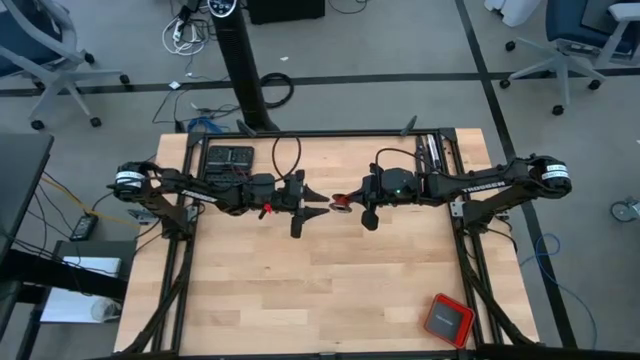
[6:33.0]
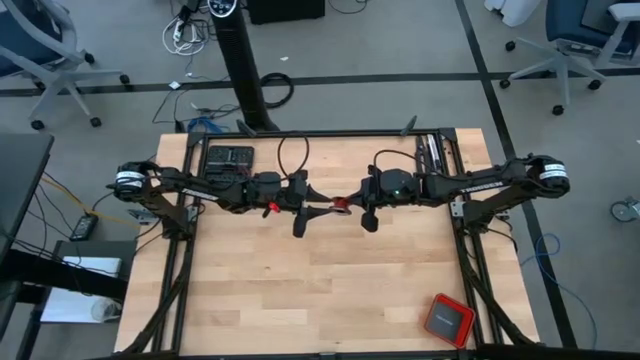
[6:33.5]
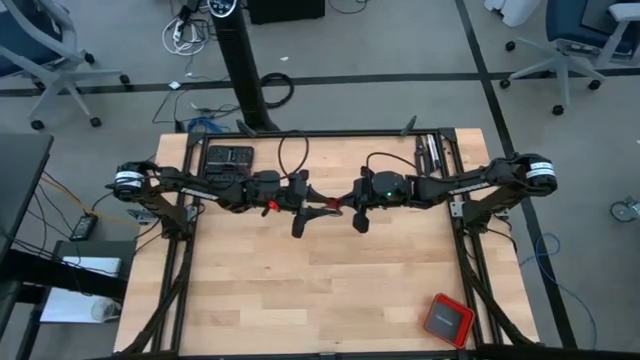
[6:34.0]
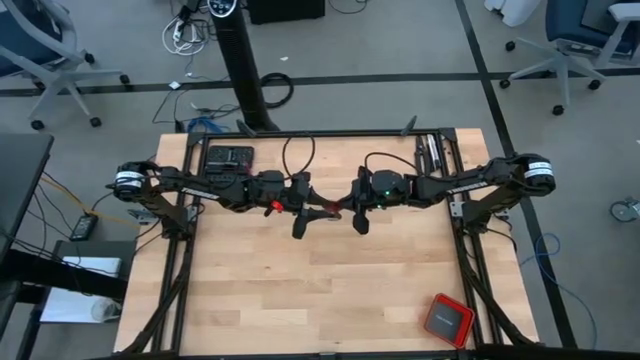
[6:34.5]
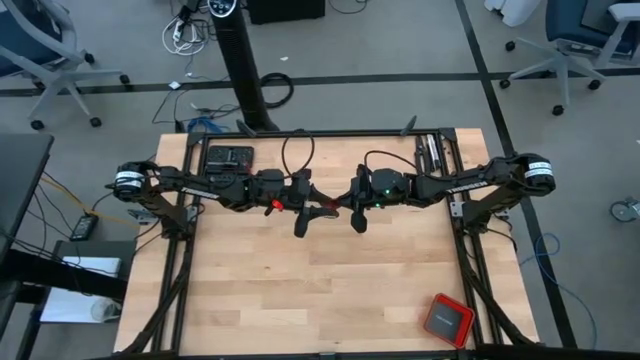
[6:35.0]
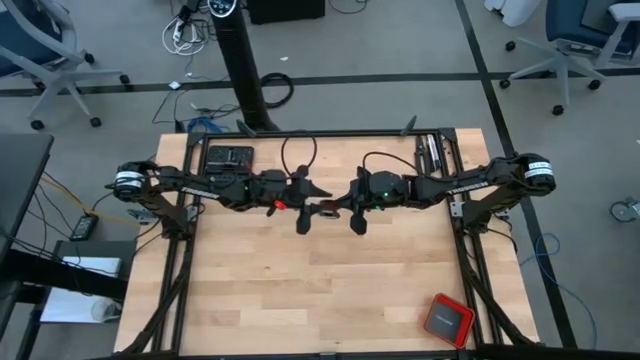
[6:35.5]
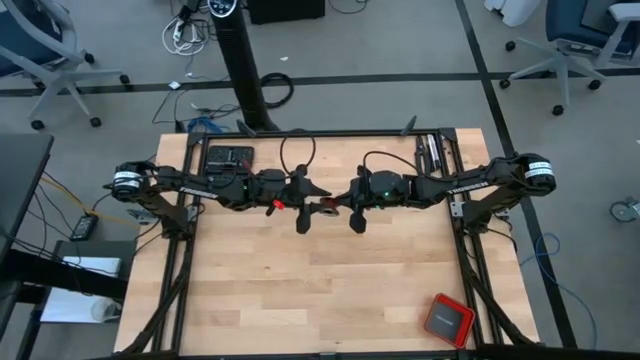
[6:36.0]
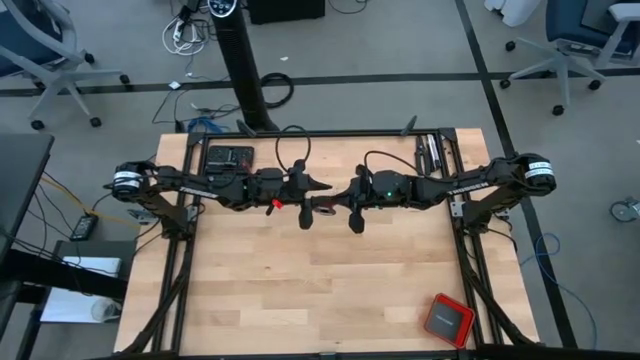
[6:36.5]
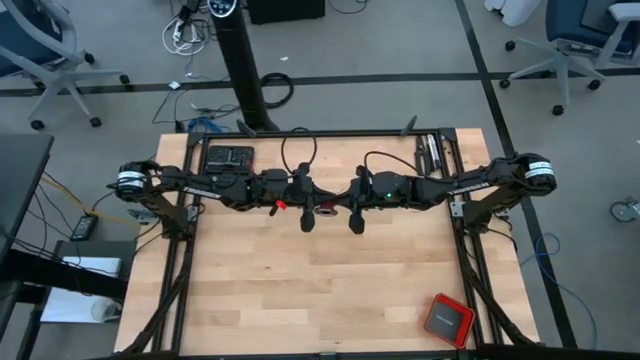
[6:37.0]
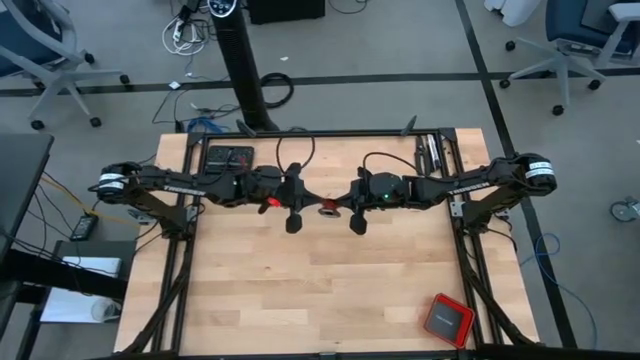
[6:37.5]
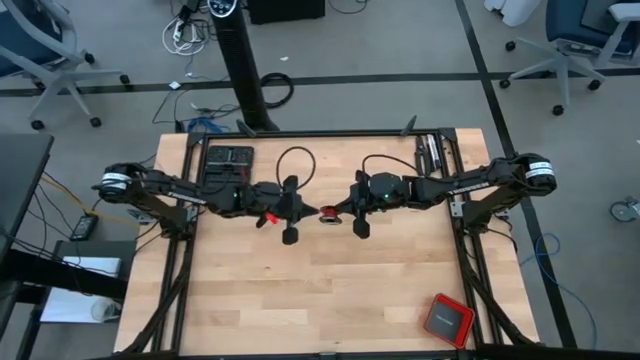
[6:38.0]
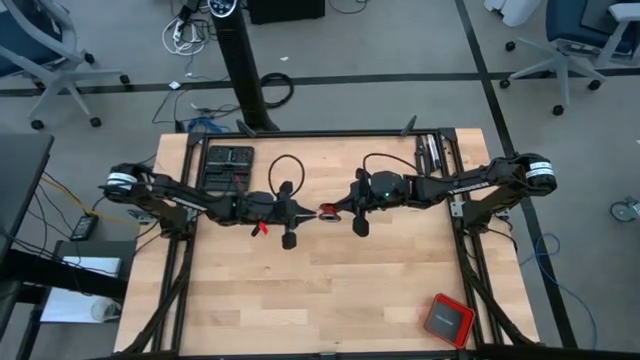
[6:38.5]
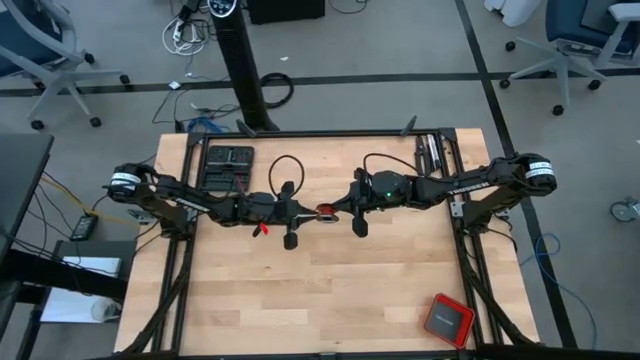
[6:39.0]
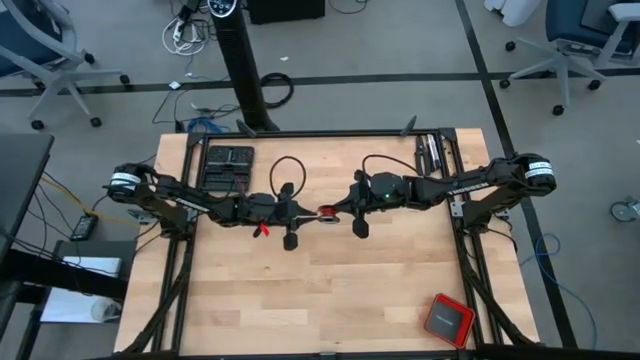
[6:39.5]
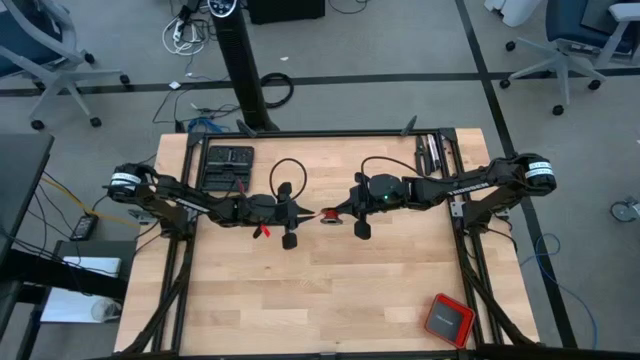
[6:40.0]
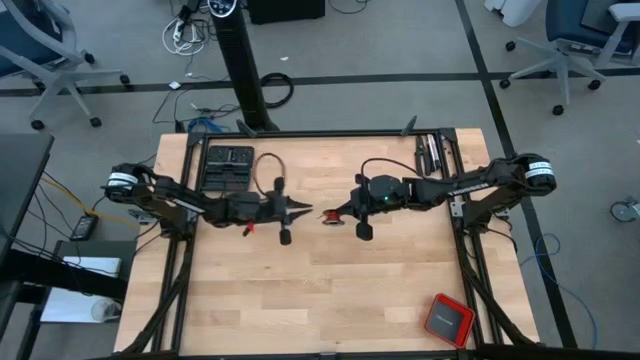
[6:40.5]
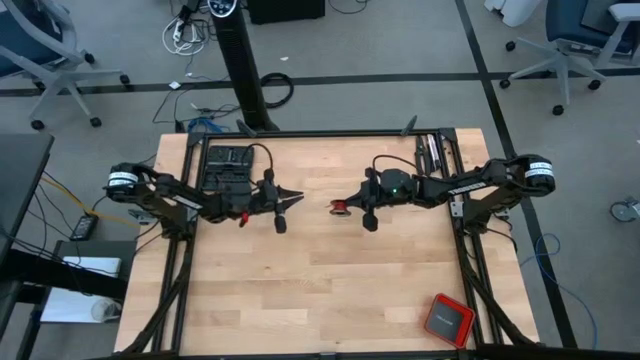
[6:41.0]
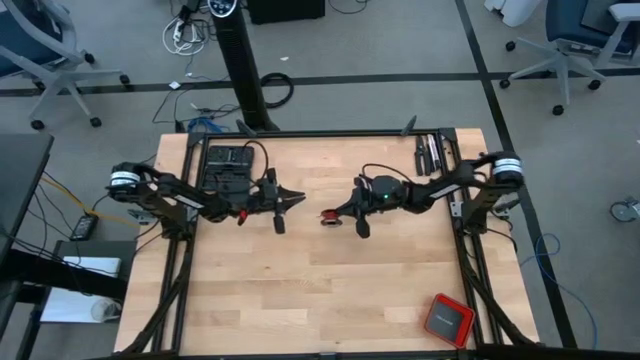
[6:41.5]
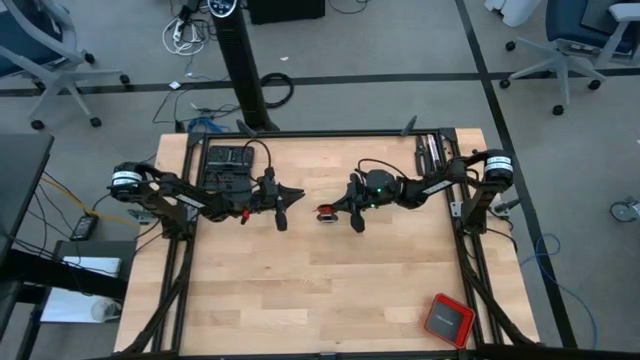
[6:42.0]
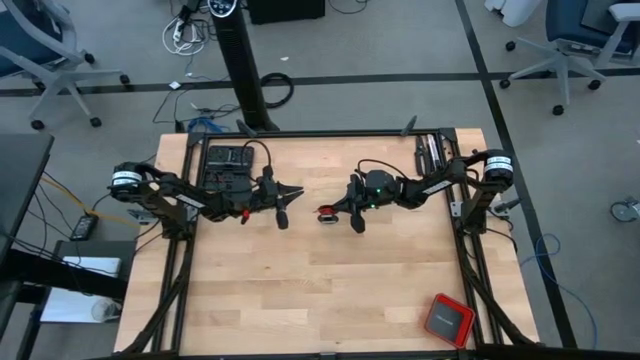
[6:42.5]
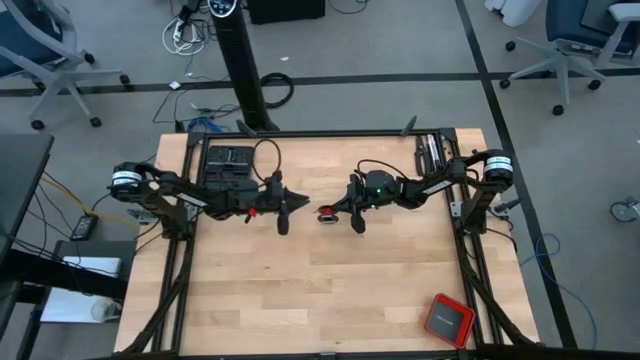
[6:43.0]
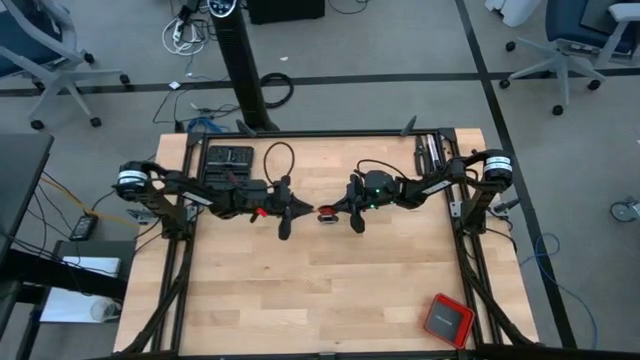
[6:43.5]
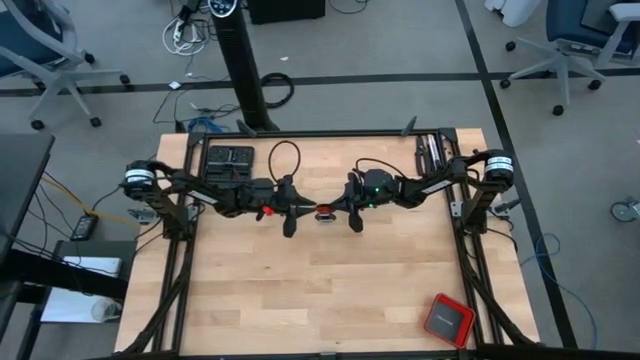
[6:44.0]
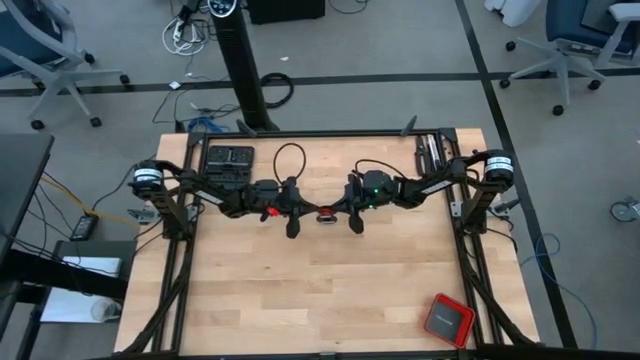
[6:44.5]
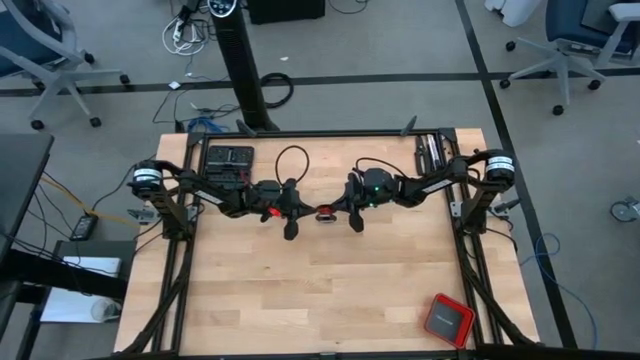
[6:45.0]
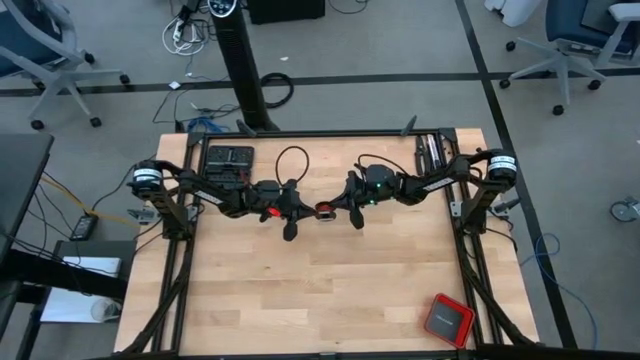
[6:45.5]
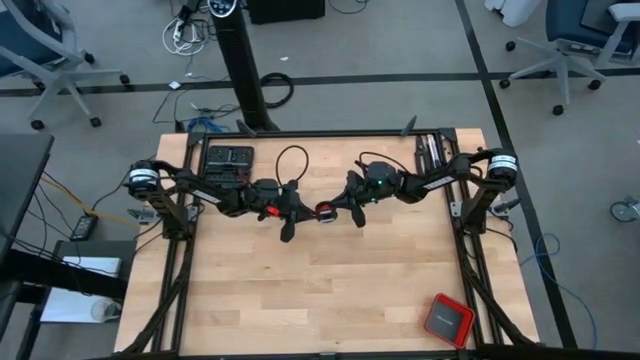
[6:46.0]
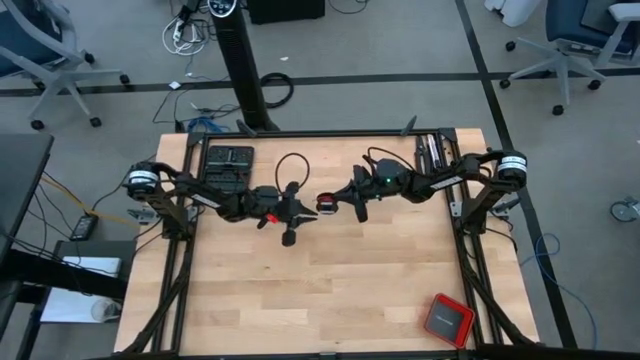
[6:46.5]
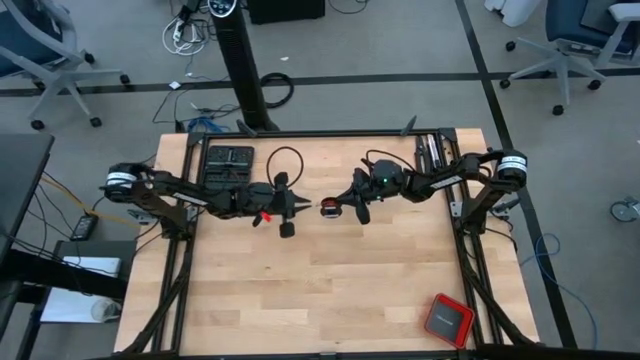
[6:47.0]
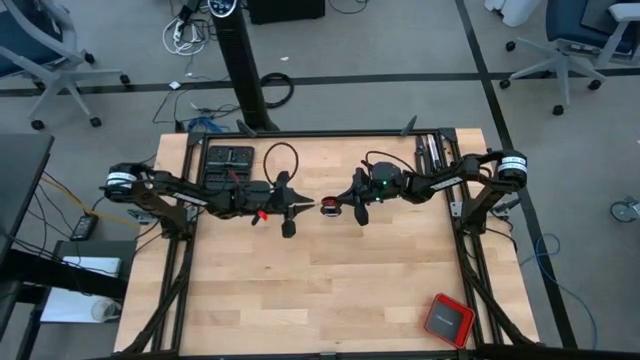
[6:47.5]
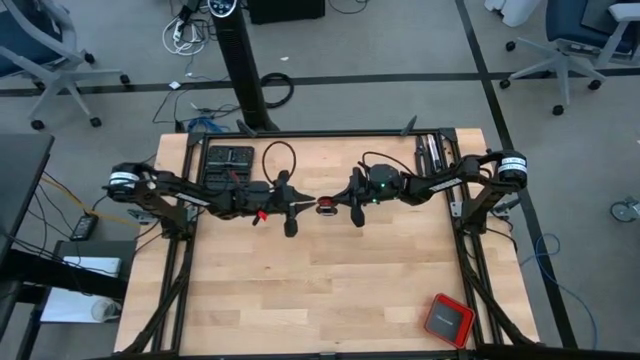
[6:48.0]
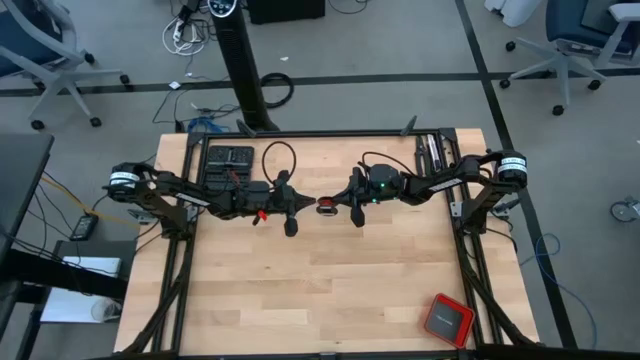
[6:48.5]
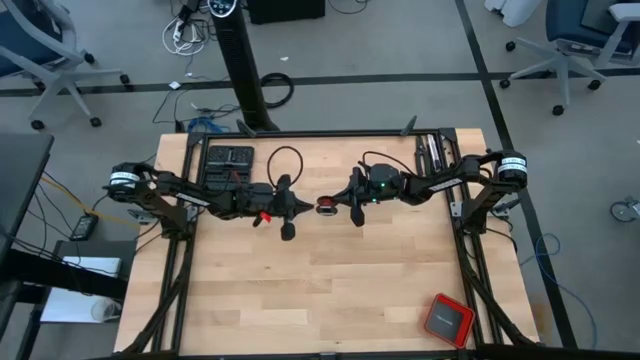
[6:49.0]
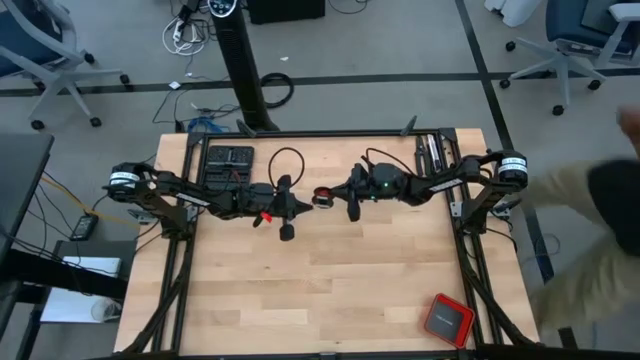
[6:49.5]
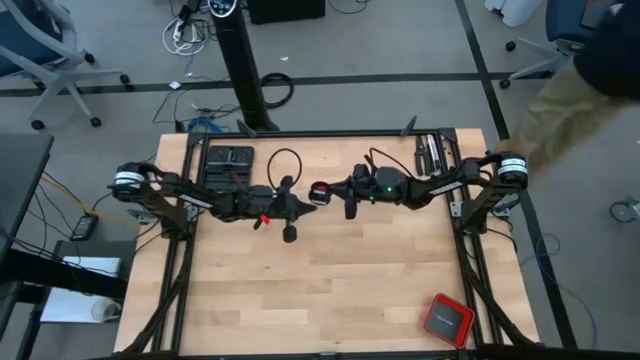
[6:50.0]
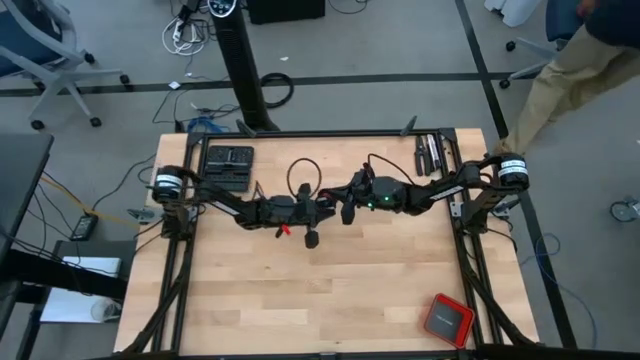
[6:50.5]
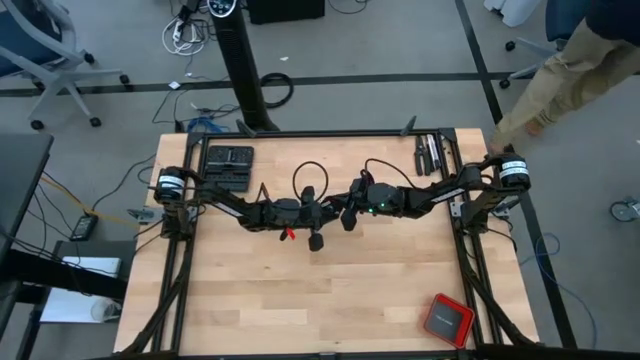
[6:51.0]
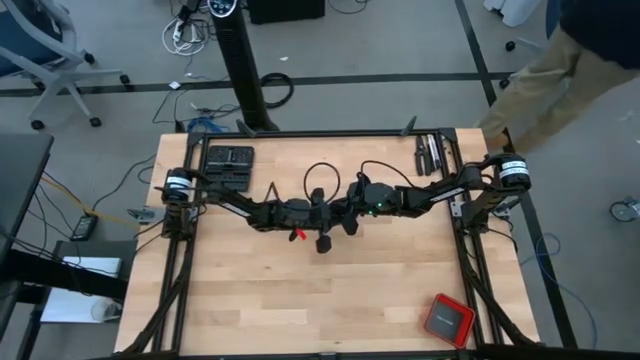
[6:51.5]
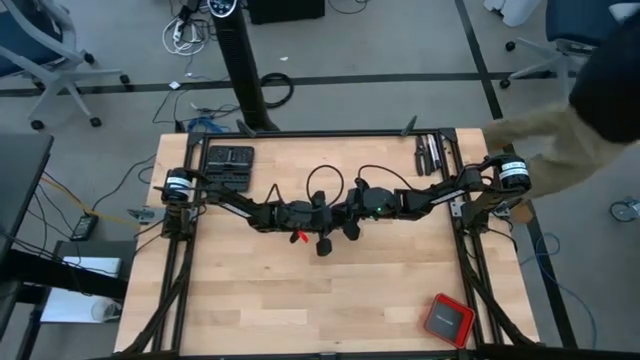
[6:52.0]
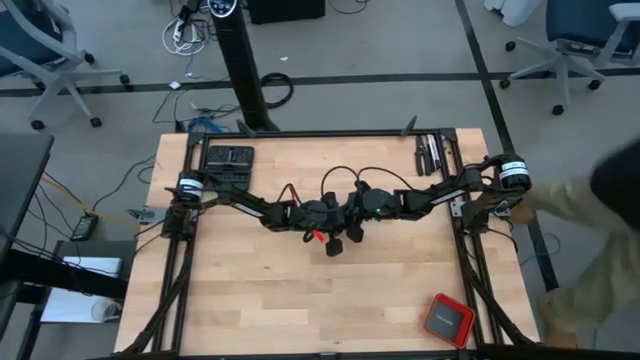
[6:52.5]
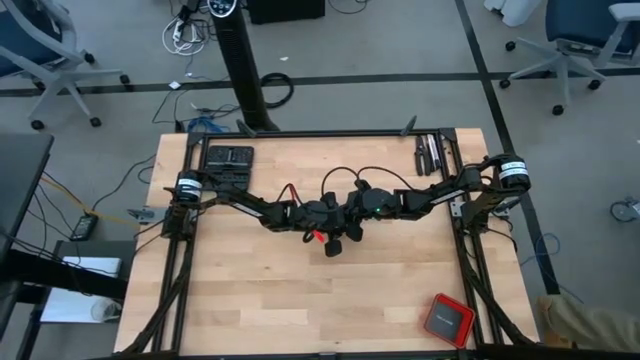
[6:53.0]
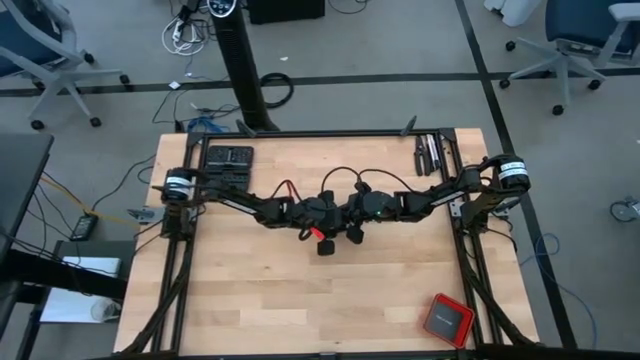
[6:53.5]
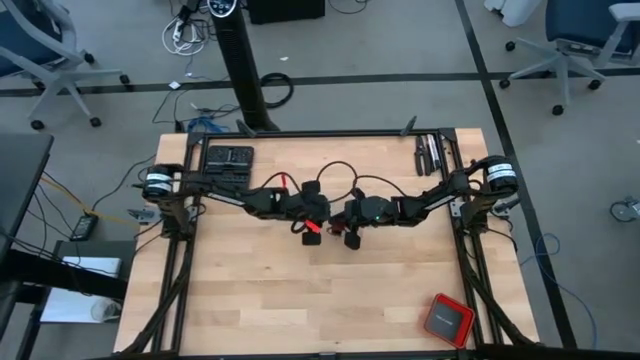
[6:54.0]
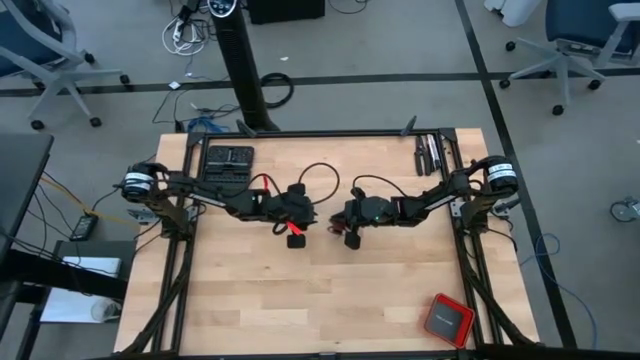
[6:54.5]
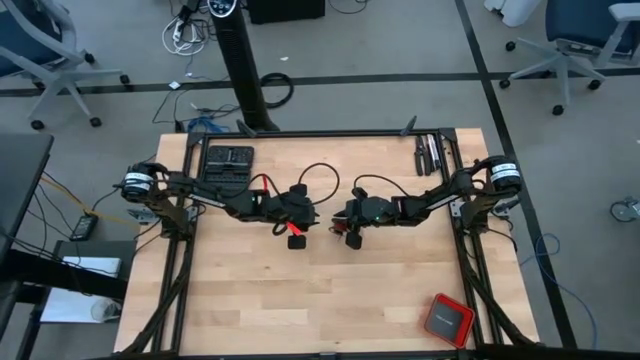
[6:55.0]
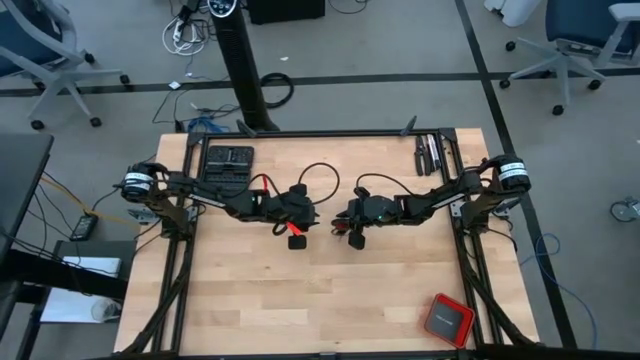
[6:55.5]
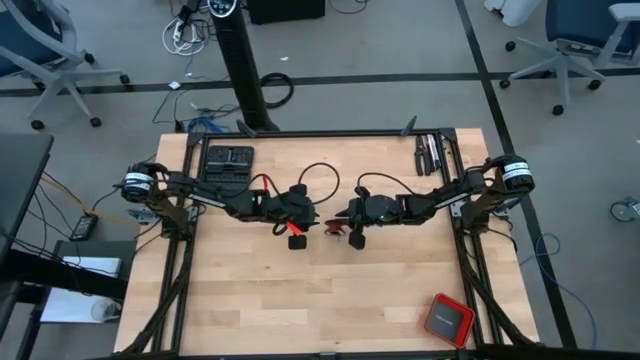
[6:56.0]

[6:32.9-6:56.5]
Task: Coil cords
Coil the red wire onto the spool
